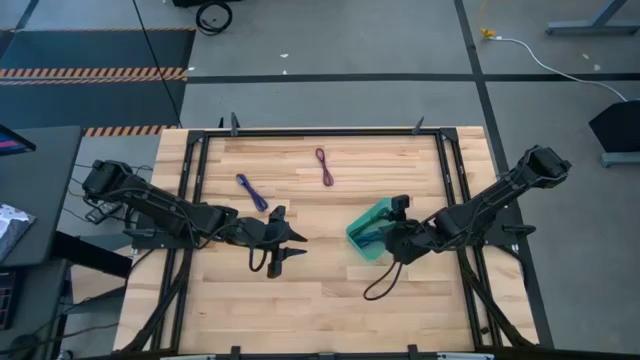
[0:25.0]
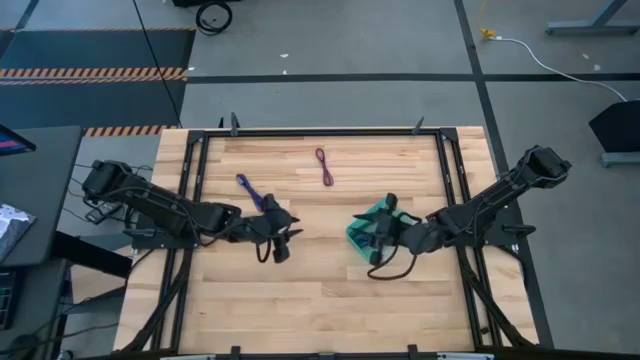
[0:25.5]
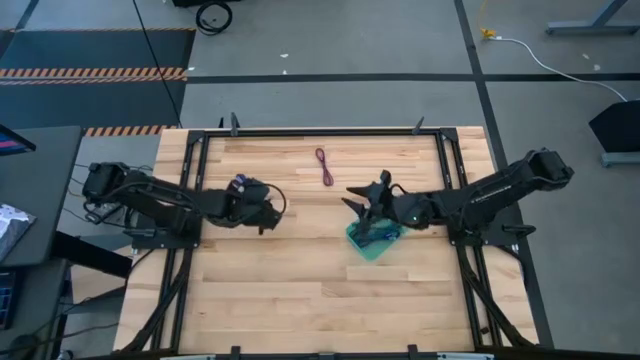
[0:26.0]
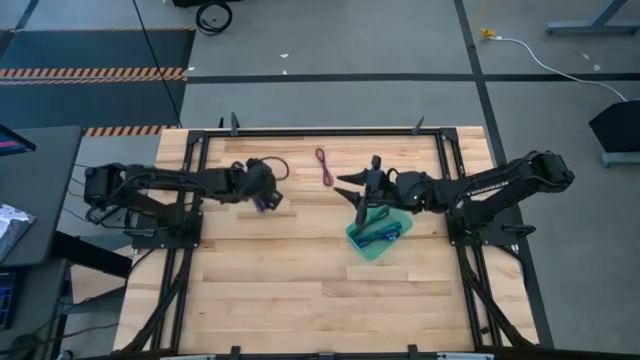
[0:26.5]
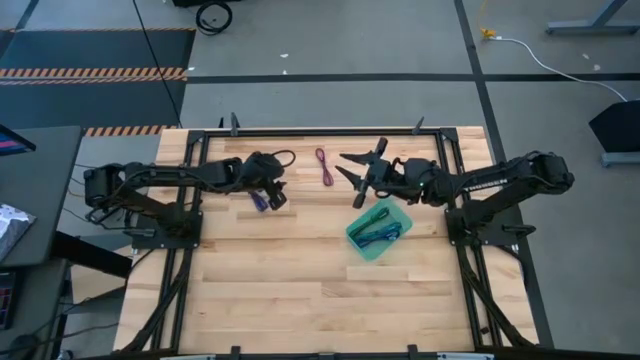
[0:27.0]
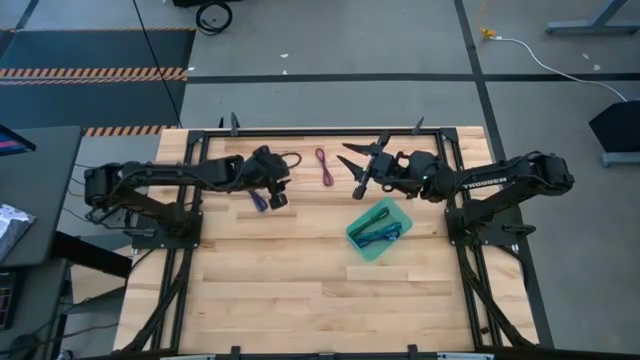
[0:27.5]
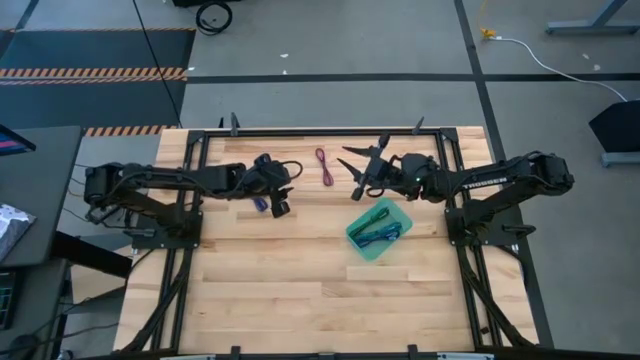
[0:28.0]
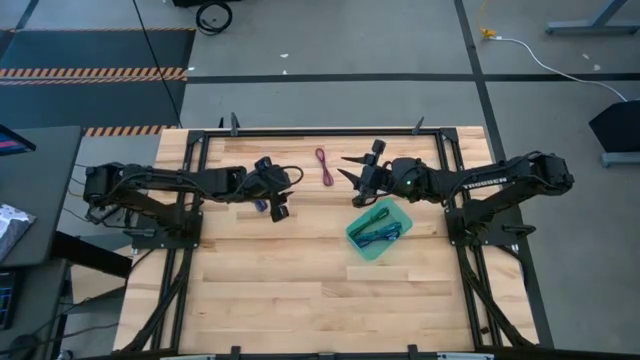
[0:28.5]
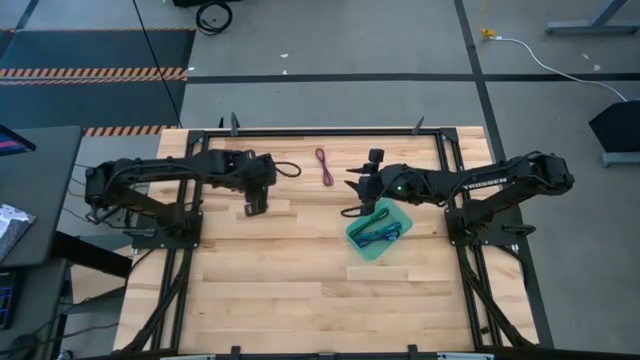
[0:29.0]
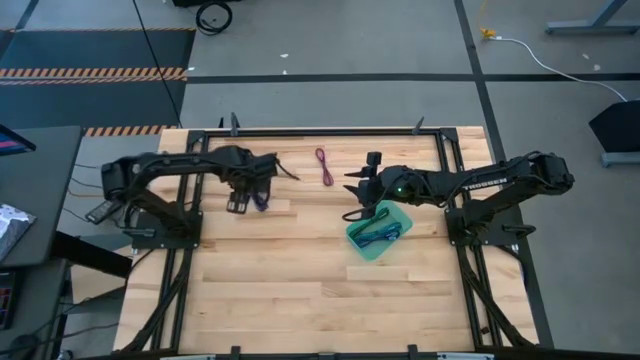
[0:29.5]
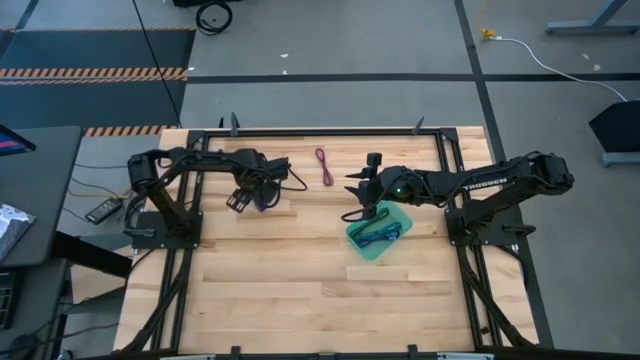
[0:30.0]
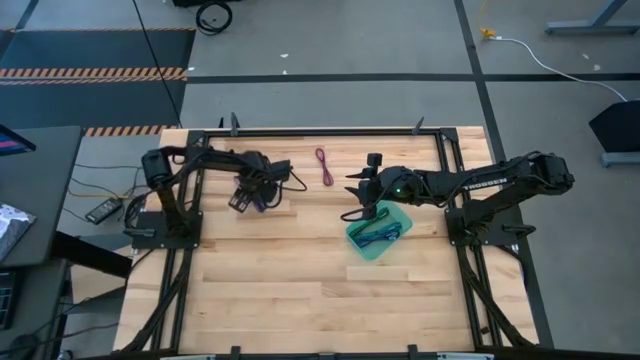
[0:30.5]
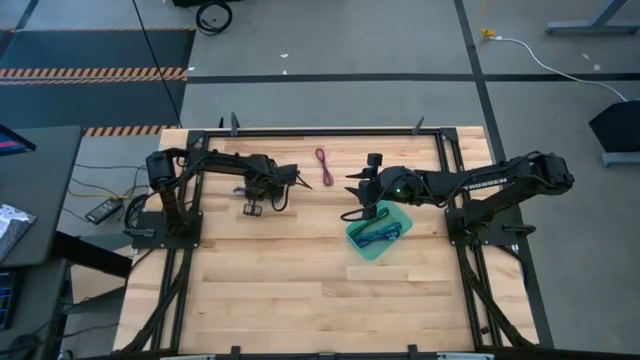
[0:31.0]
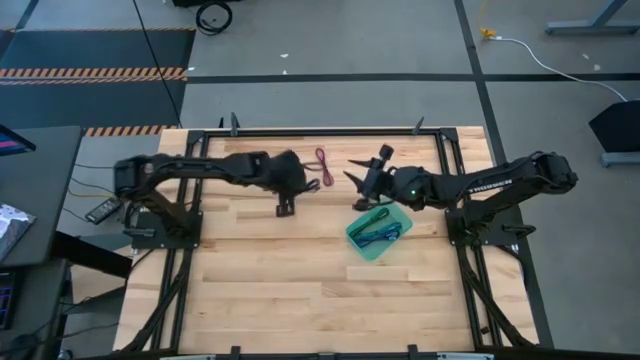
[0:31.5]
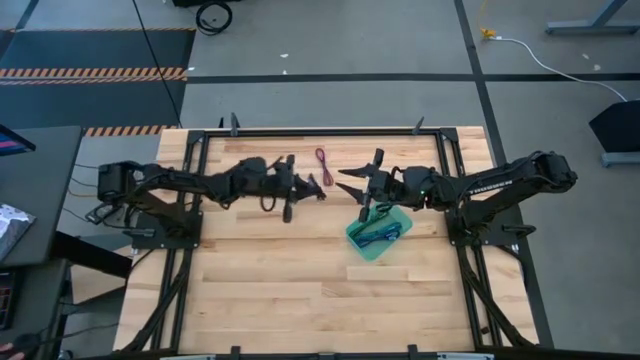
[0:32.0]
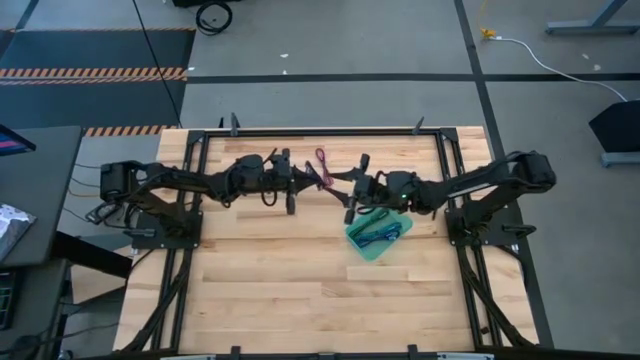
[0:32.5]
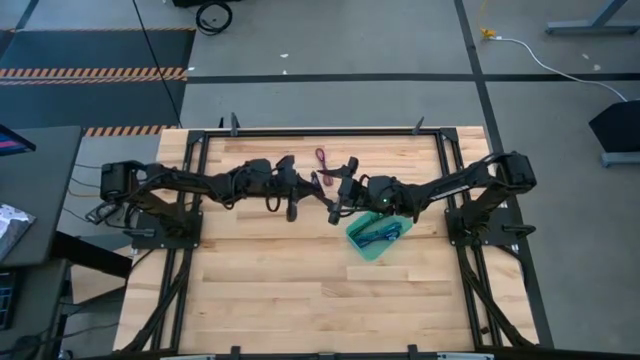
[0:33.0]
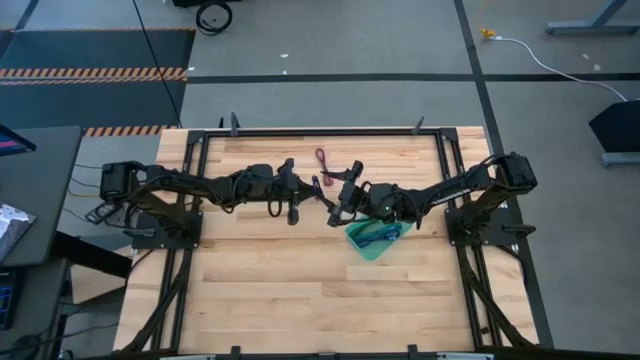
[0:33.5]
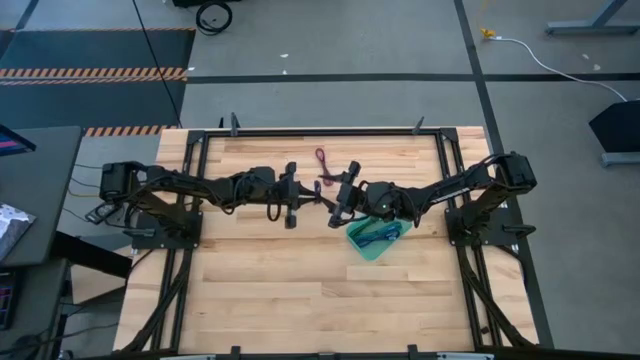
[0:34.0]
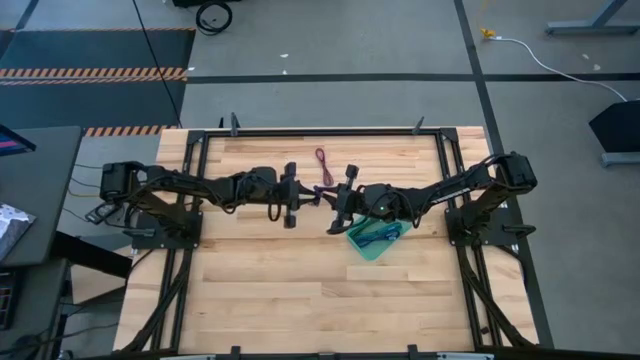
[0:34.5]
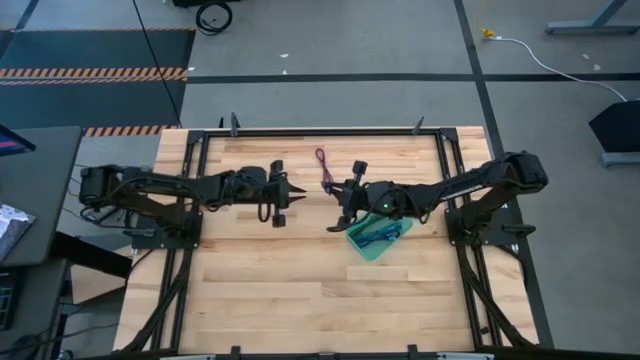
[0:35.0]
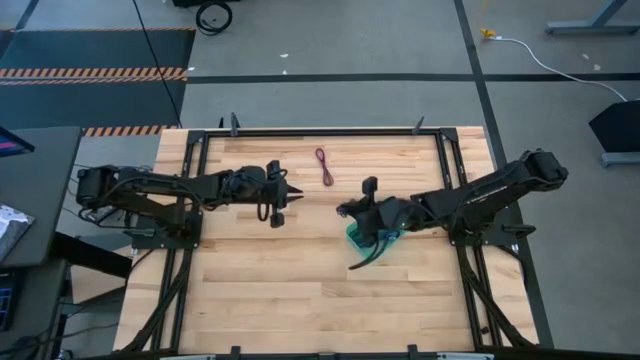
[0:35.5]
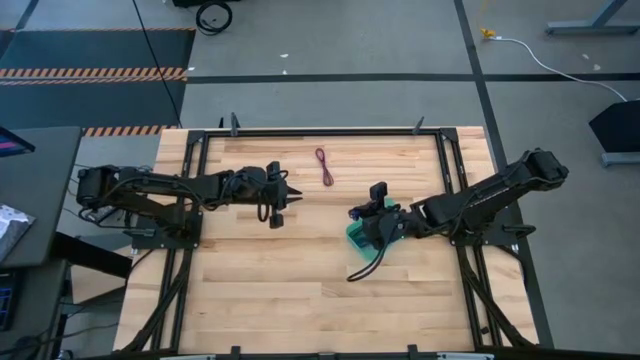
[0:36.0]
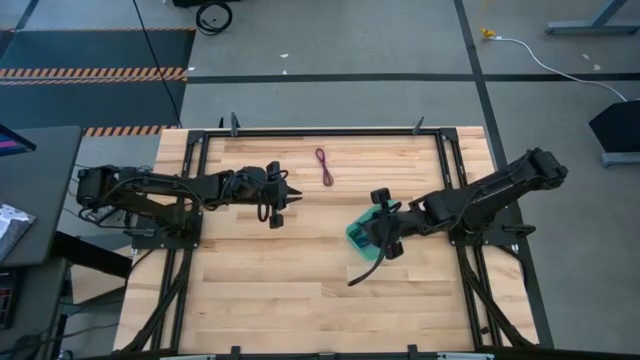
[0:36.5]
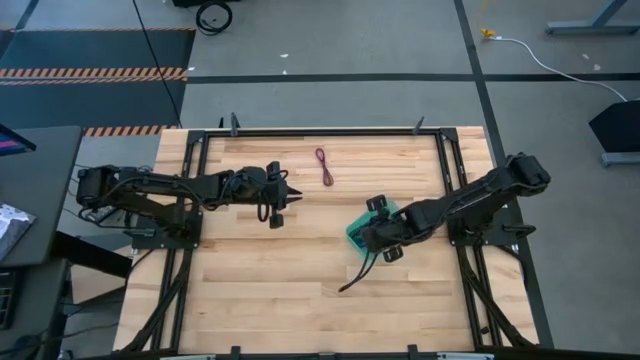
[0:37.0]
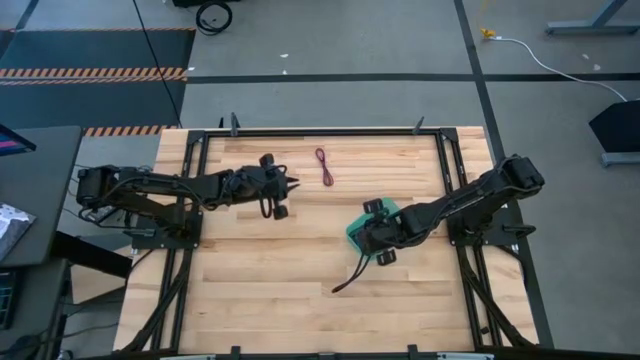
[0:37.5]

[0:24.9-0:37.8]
Task: Pick and place USB-C Cables
Put the violet charger cable into the green bin

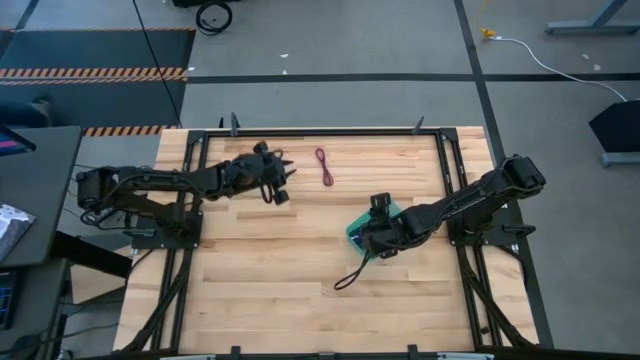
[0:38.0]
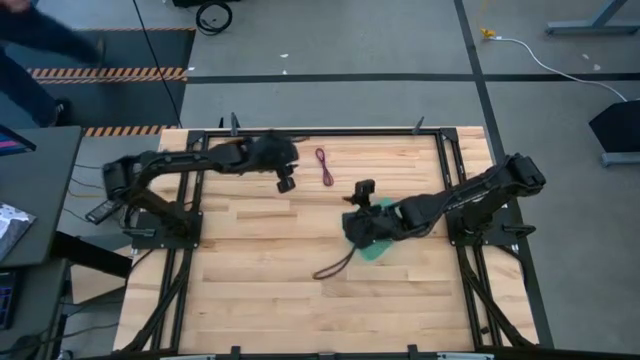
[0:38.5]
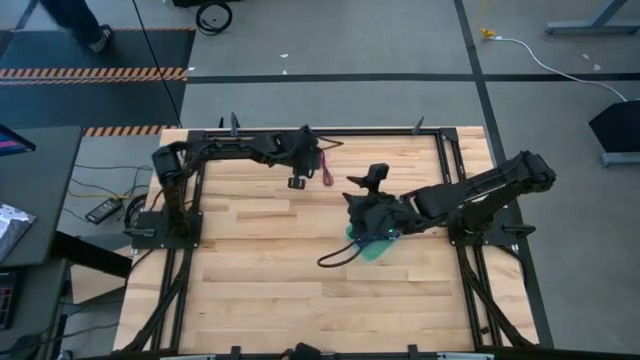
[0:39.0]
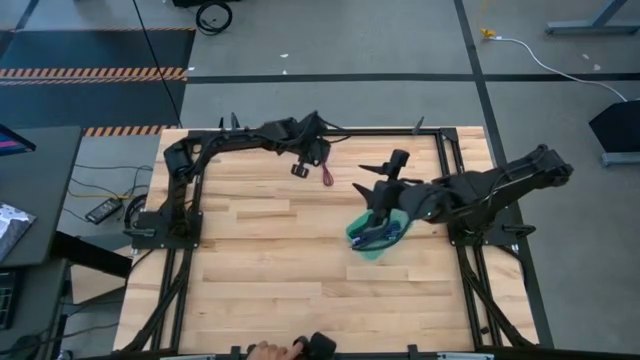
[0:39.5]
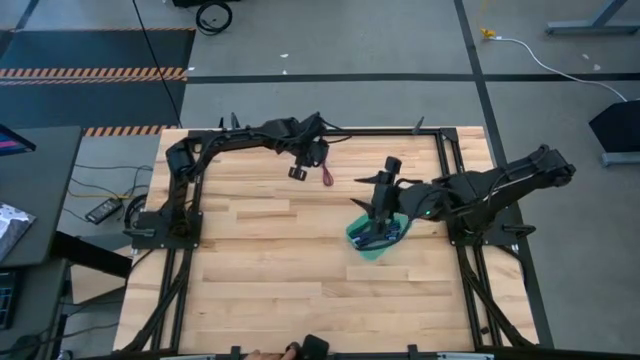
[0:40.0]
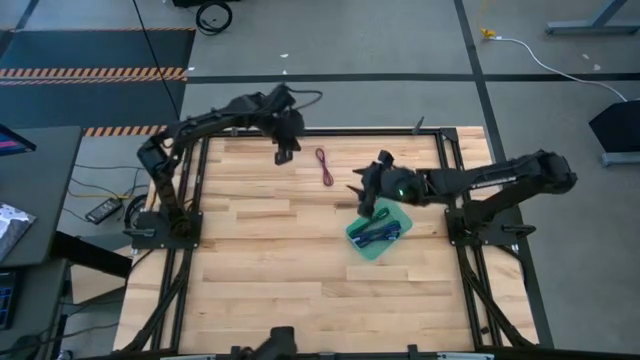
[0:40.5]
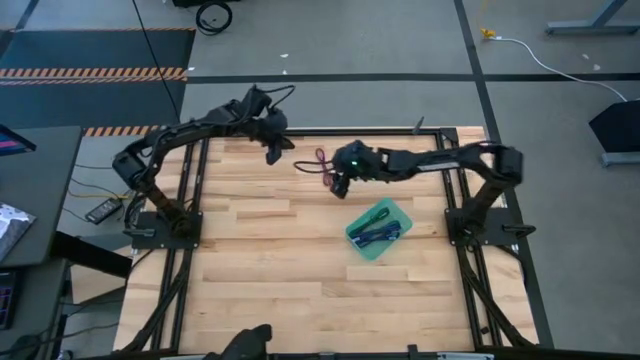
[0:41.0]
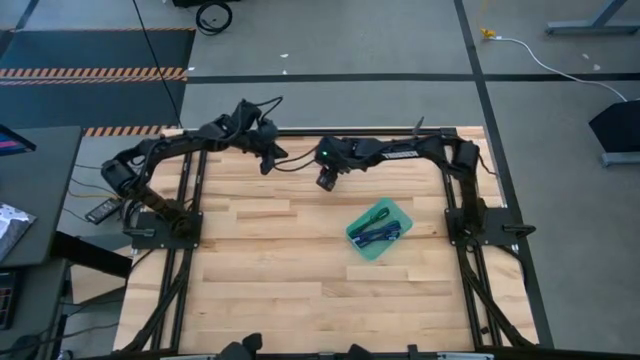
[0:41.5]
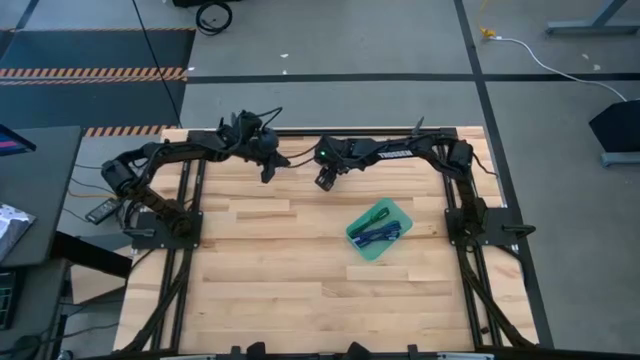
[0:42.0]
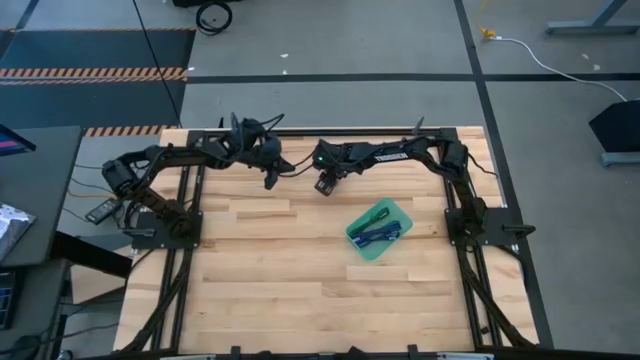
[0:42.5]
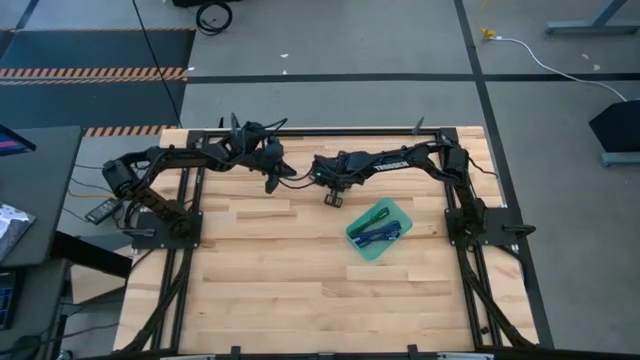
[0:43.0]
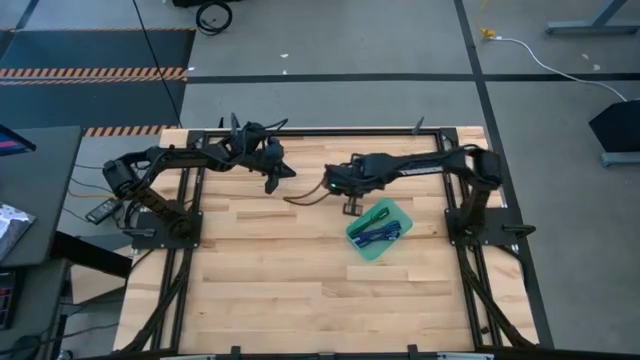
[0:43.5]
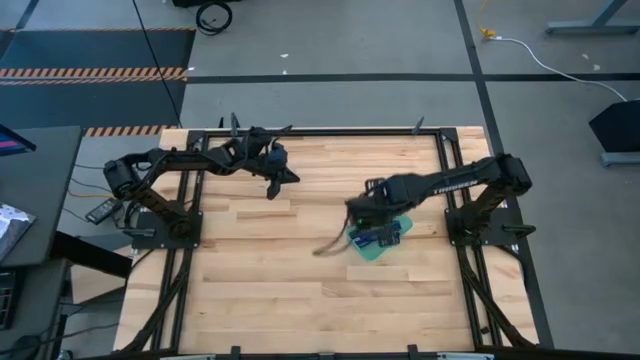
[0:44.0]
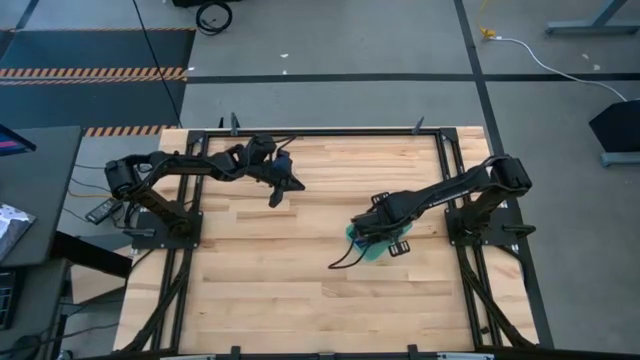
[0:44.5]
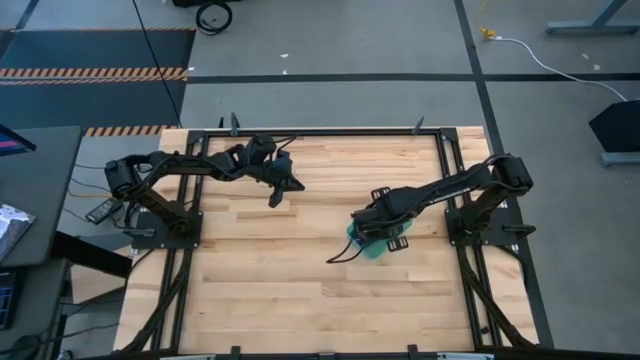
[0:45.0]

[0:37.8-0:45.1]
Put the pink charger cable into the green bin
